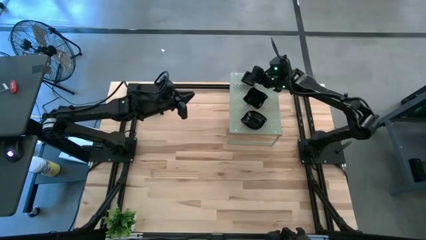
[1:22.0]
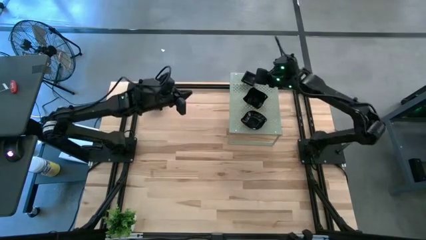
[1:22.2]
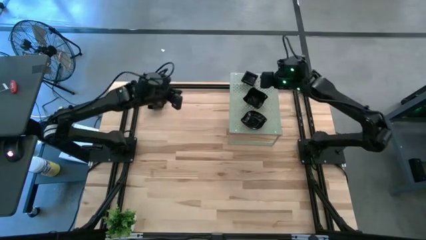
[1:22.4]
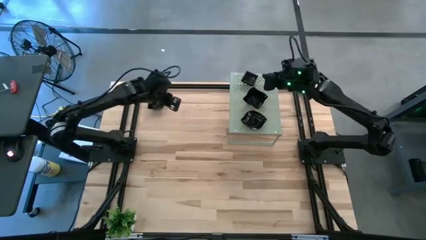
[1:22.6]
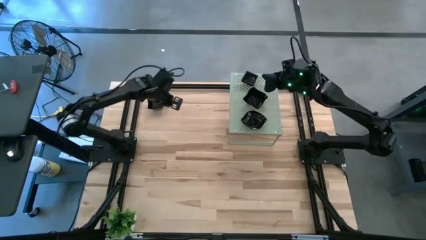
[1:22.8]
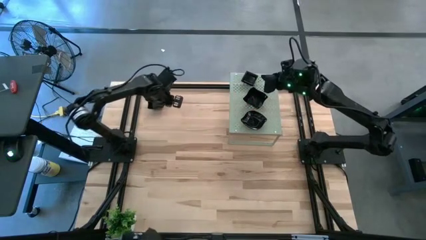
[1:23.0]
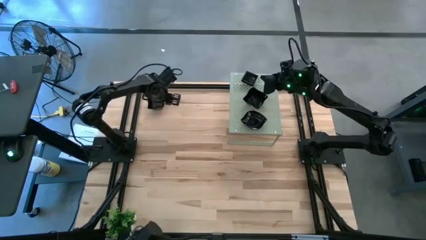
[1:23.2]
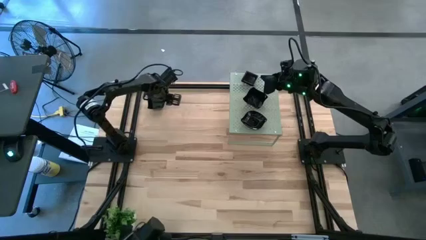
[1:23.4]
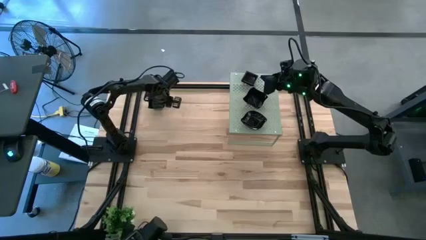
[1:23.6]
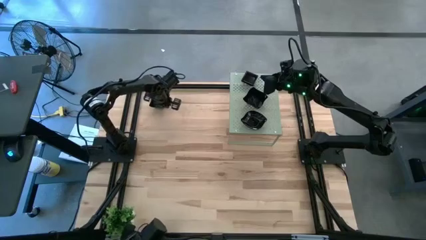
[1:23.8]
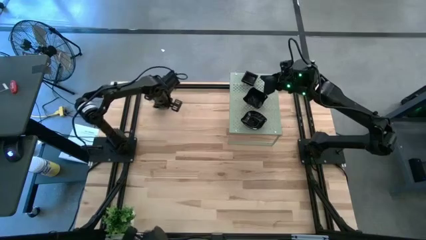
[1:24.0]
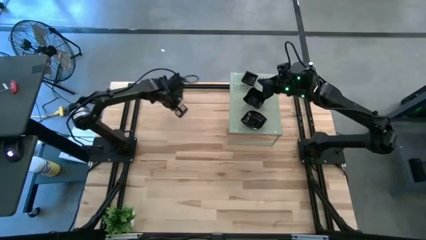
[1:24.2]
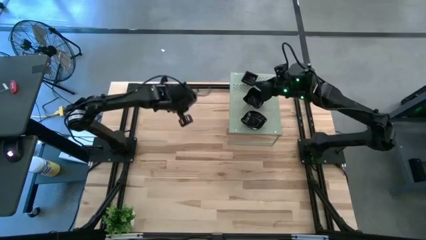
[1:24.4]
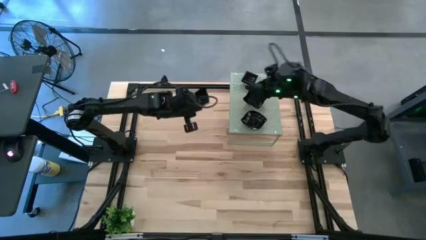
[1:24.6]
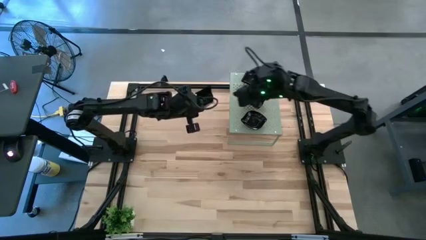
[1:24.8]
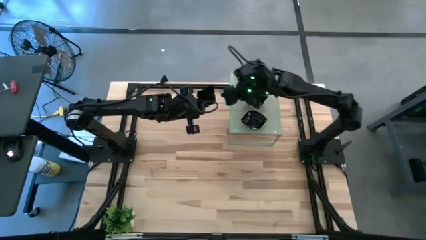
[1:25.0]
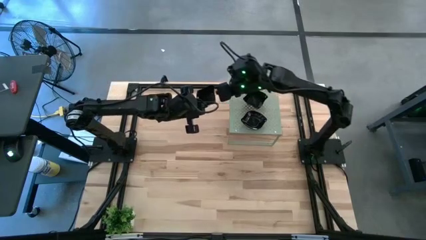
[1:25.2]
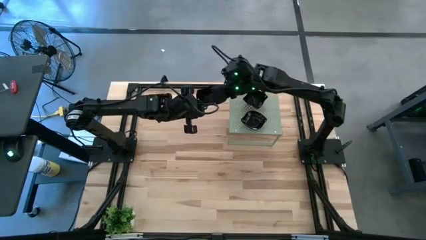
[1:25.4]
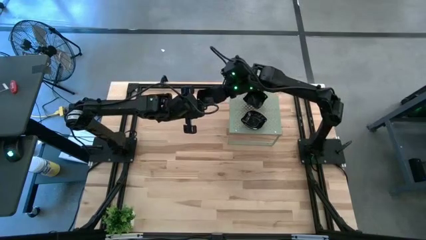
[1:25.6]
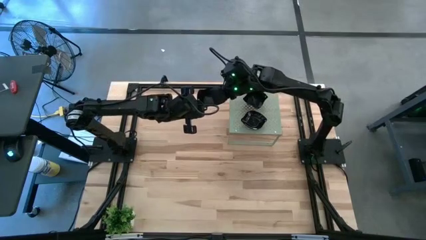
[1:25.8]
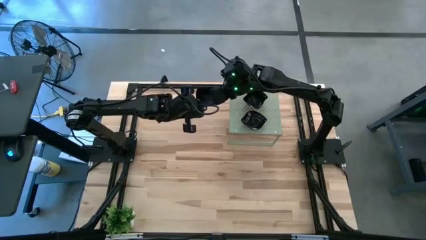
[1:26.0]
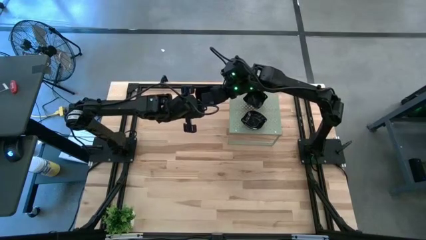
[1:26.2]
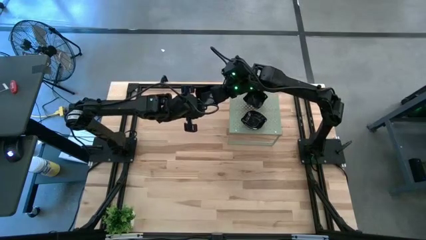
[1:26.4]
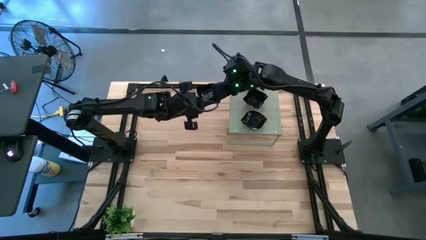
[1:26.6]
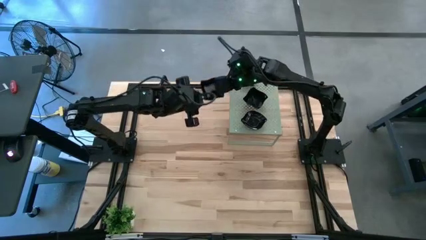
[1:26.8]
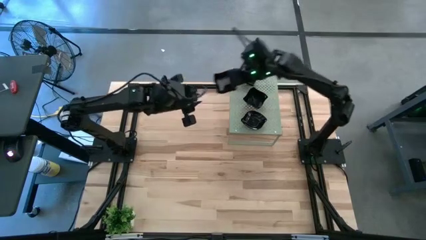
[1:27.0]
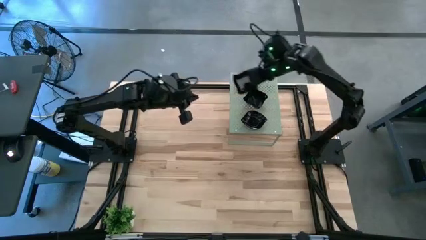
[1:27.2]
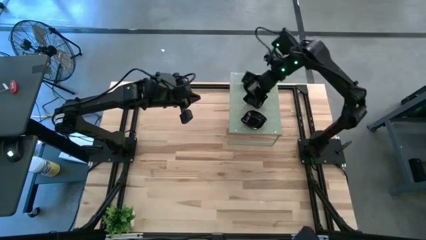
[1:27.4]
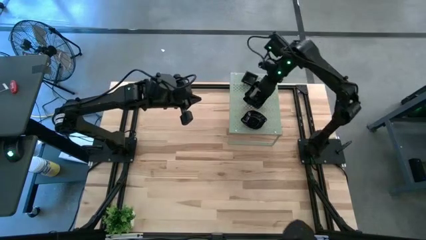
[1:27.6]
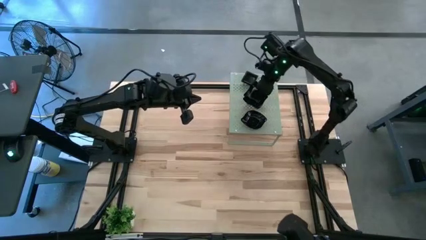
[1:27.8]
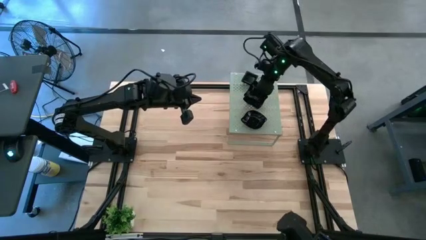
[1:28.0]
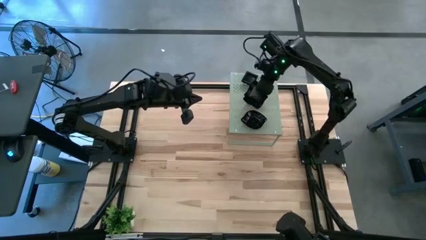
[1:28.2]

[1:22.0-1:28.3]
Task: Pick & Place Mini shaped plates
Stack the black distorted square plate on the black distorted square plate on the shelf

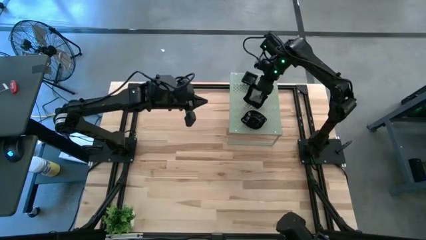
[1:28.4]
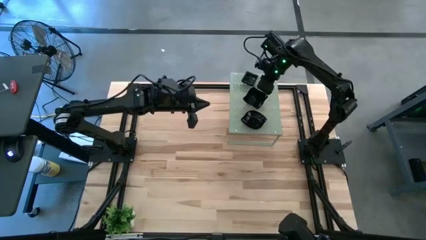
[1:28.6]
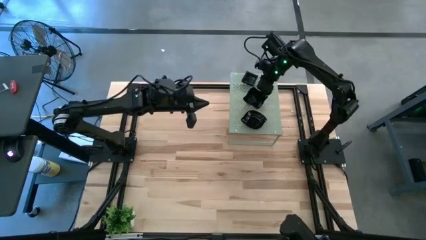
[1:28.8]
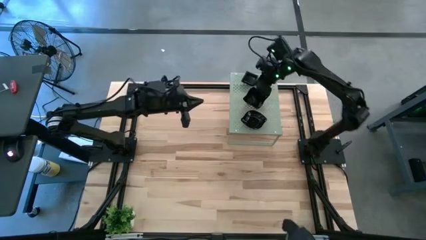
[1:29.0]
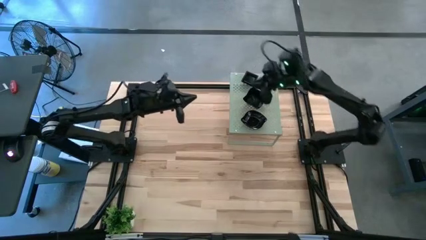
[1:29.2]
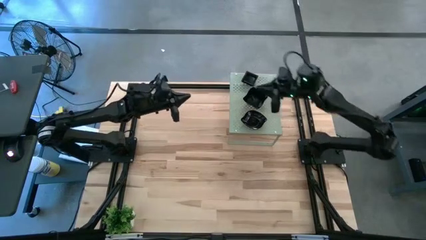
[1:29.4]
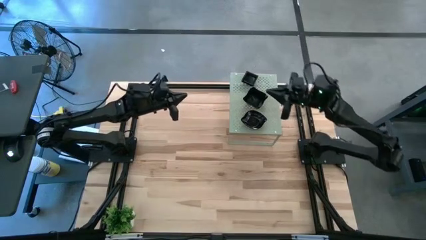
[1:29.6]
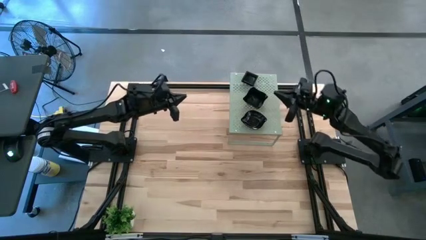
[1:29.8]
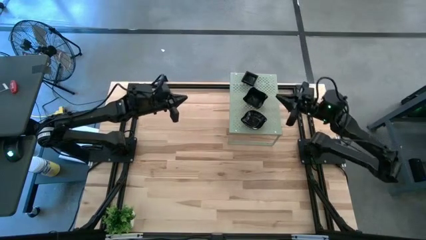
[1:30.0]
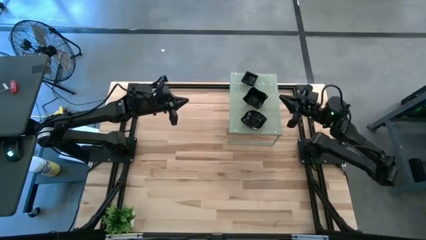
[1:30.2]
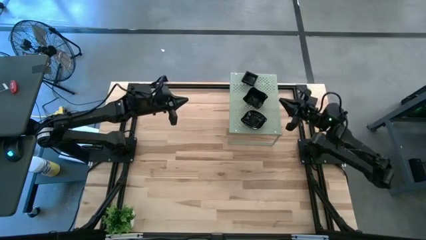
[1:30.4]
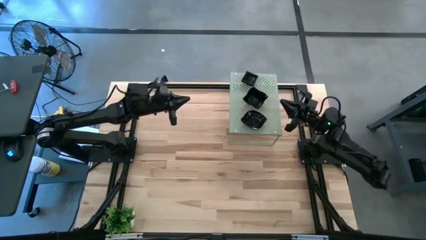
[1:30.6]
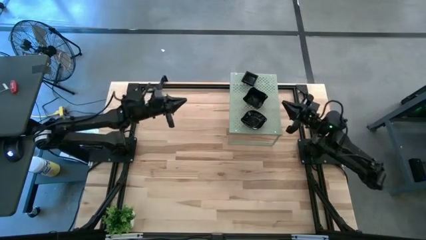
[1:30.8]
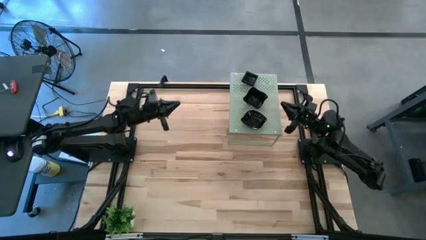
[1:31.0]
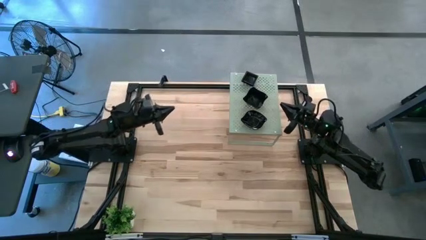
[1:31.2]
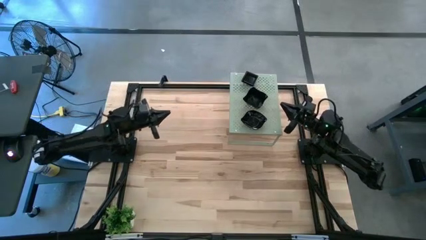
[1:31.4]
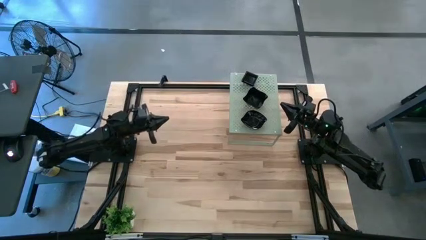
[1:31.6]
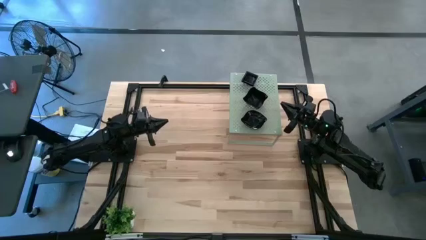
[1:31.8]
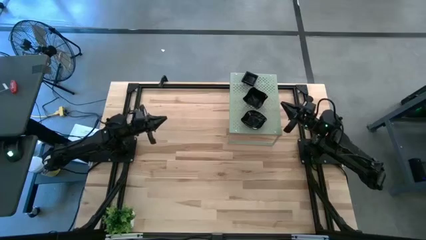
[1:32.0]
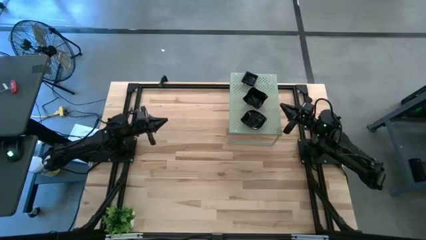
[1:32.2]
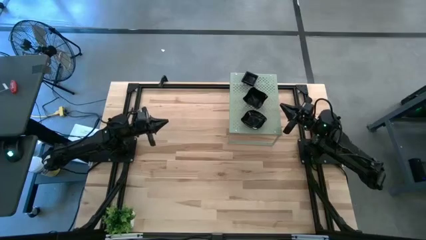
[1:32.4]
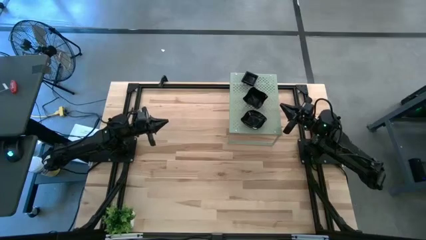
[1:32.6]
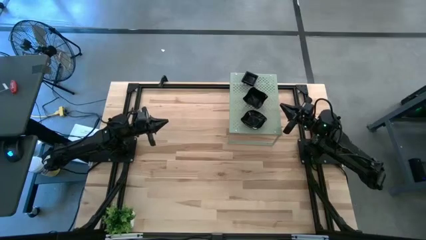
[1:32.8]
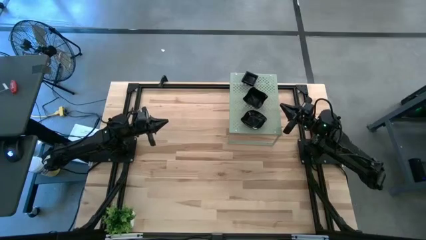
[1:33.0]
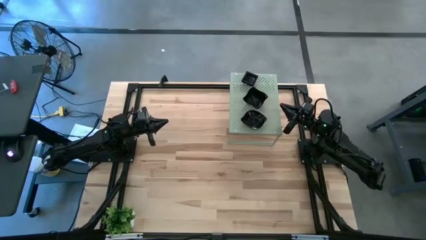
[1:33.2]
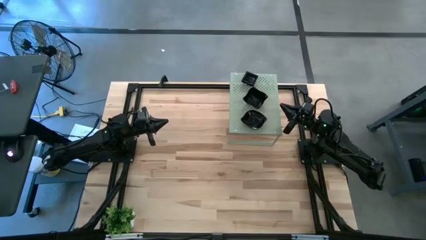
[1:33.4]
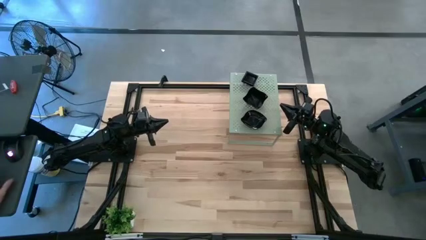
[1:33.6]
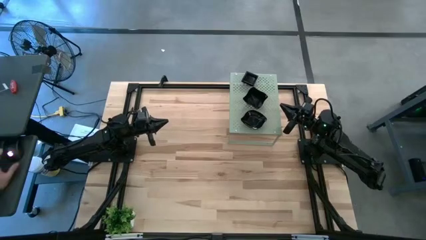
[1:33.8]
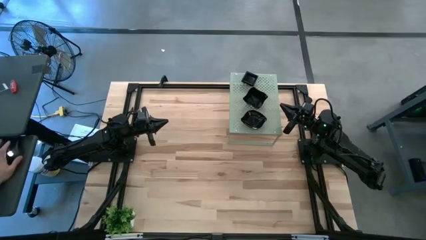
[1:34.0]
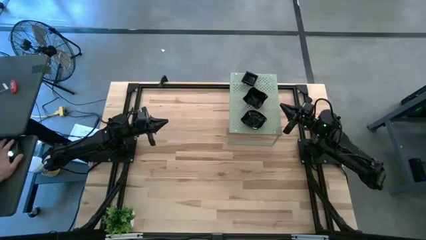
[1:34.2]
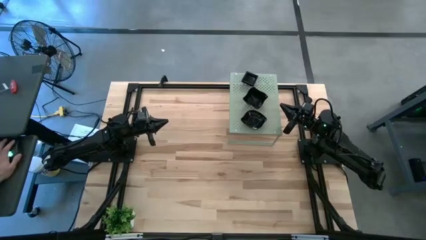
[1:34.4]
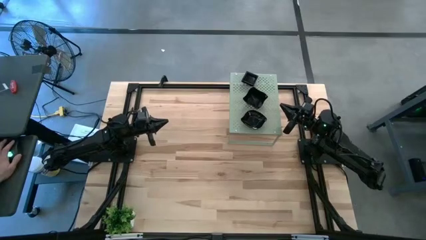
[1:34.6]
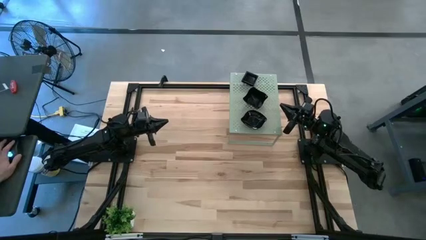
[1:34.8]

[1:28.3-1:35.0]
Return to Home Position

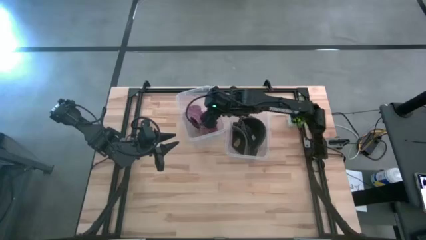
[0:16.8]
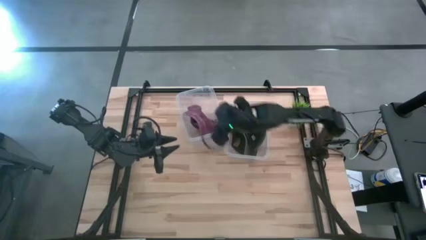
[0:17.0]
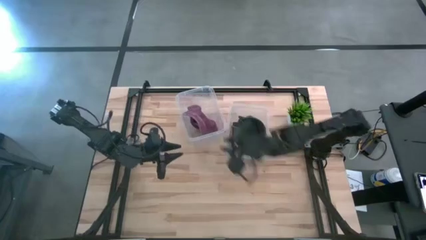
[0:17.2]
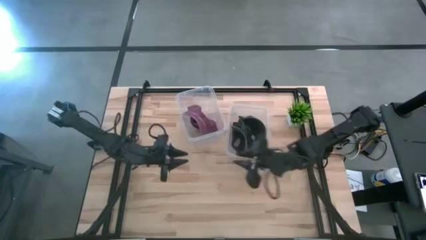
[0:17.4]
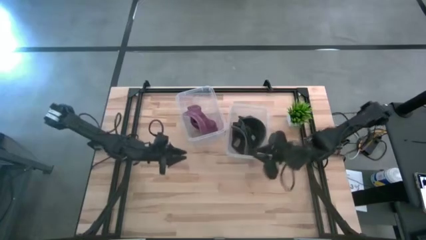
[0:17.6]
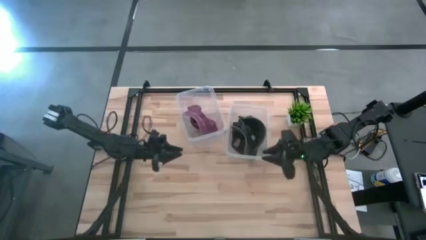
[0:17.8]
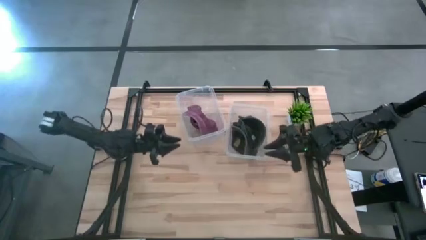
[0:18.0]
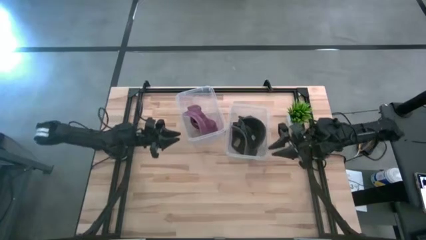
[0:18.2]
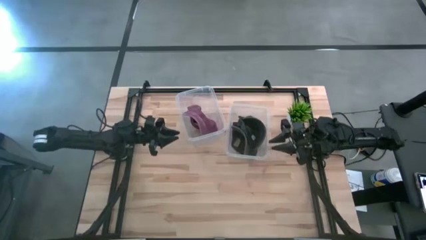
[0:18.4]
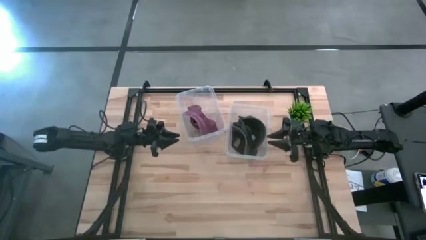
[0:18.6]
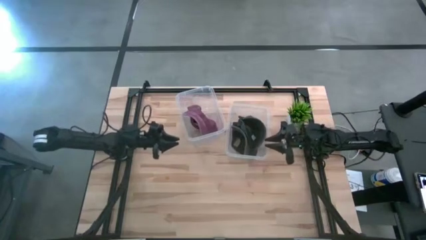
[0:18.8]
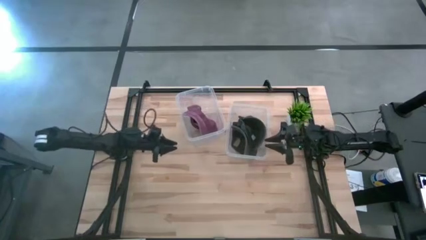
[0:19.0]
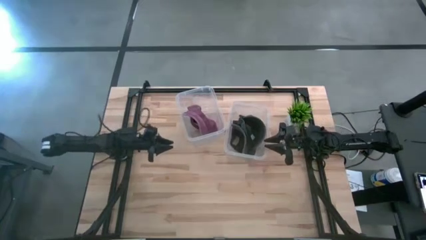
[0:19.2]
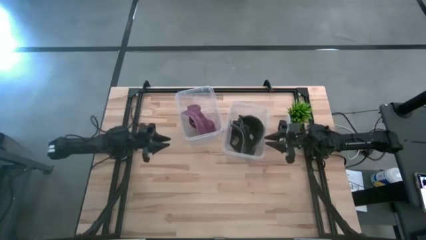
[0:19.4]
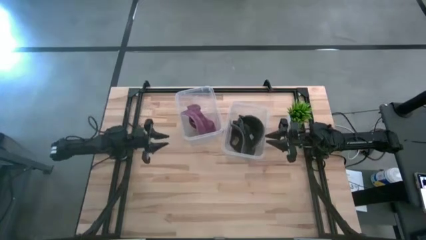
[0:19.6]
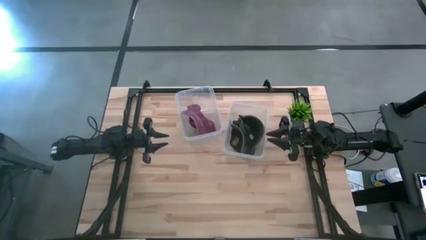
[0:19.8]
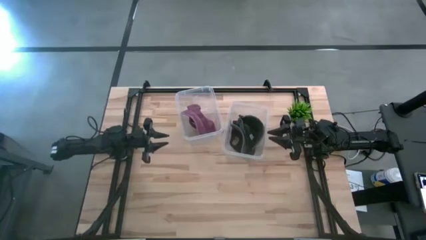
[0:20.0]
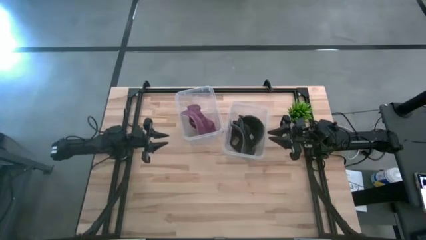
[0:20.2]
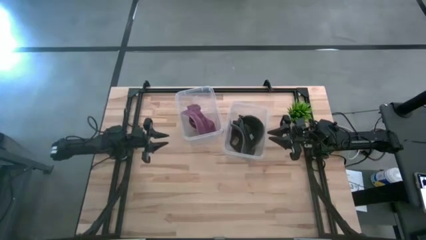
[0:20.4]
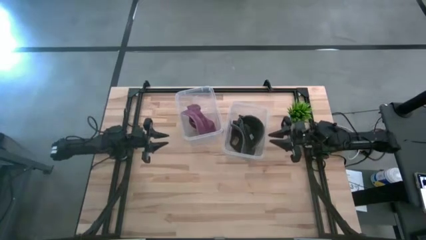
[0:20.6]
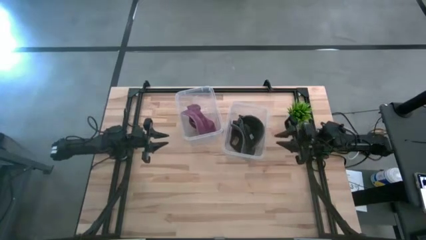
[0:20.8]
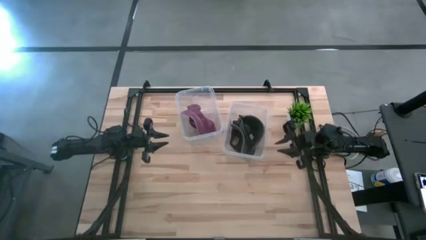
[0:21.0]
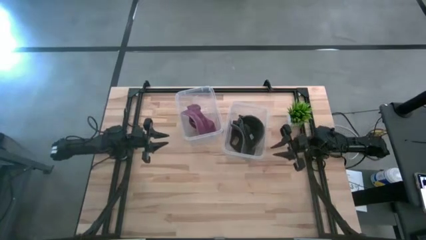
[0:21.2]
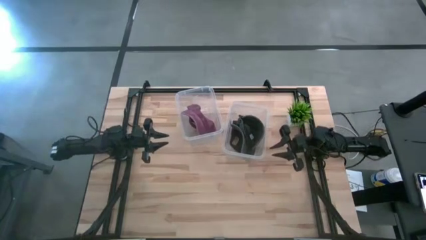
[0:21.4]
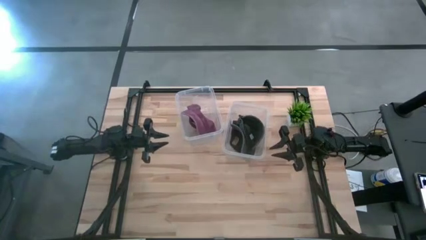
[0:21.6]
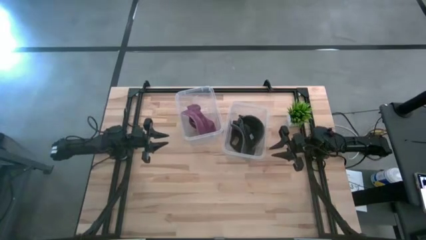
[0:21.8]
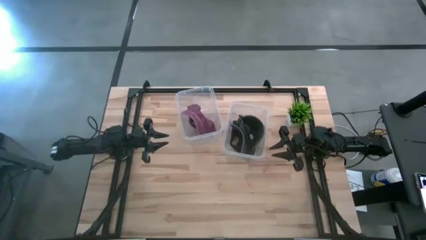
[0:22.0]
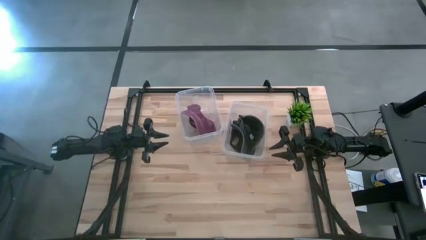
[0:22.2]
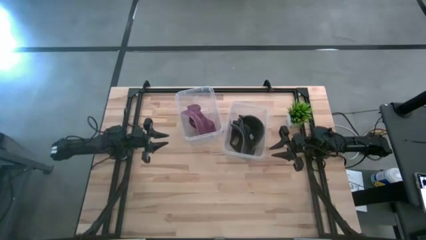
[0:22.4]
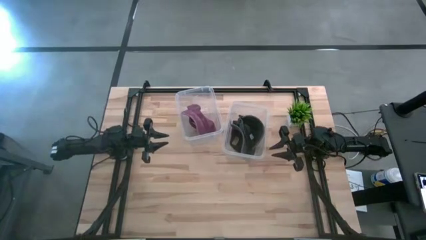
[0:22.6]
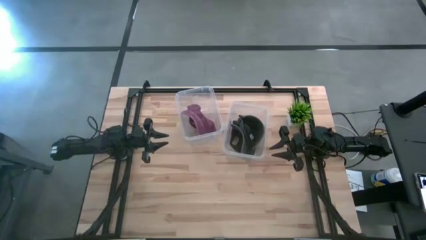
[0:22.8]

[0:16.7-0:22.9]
Task: Pick and place caps into container
Return to home position
